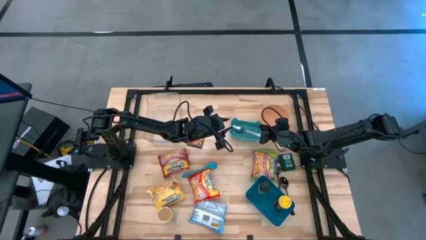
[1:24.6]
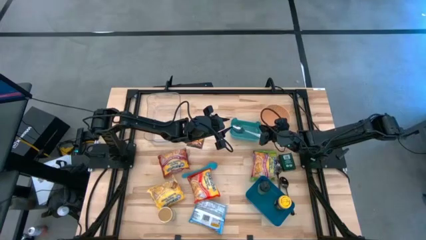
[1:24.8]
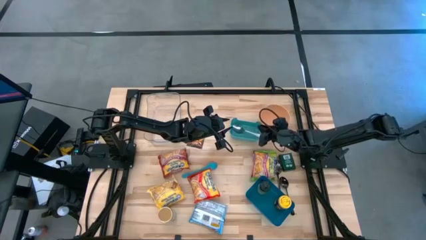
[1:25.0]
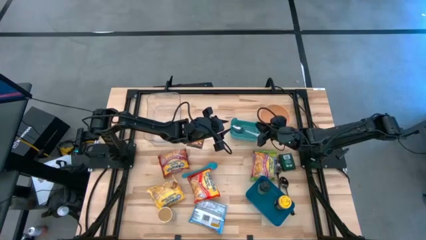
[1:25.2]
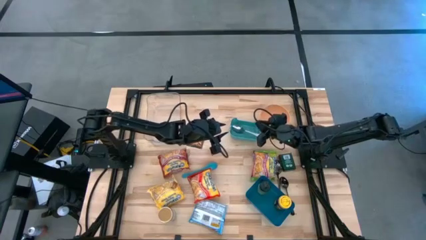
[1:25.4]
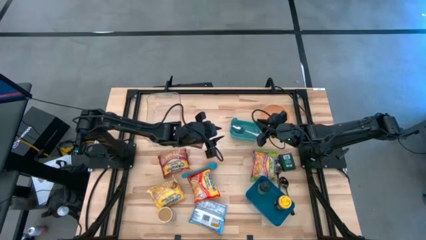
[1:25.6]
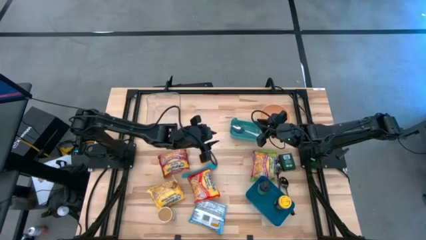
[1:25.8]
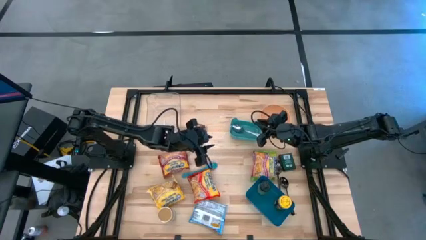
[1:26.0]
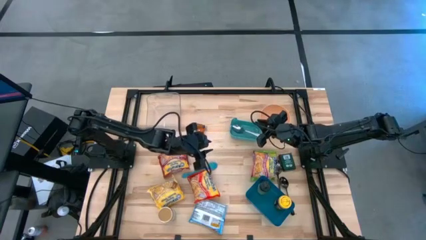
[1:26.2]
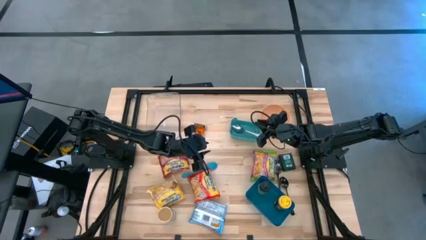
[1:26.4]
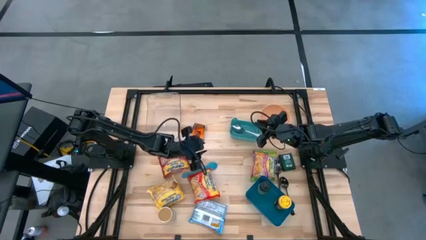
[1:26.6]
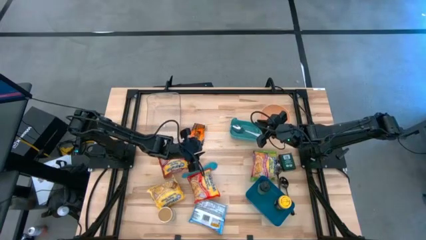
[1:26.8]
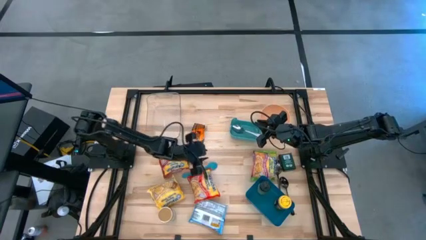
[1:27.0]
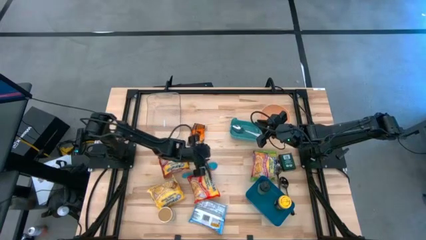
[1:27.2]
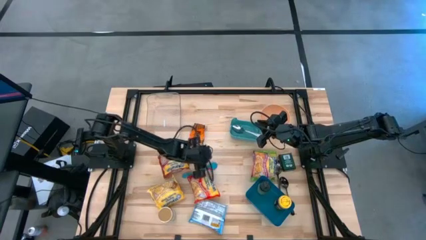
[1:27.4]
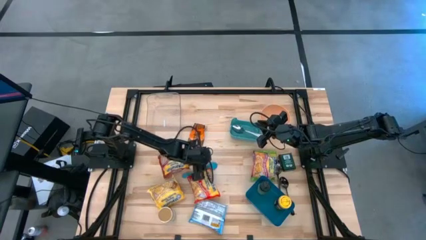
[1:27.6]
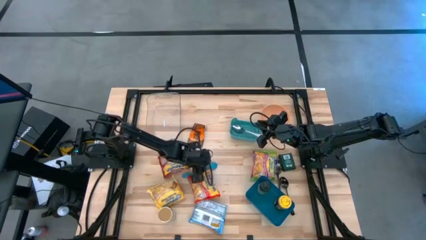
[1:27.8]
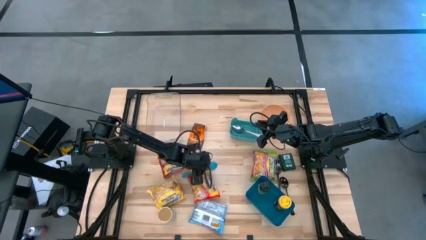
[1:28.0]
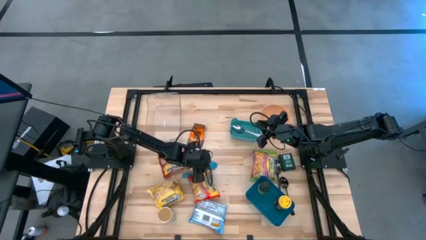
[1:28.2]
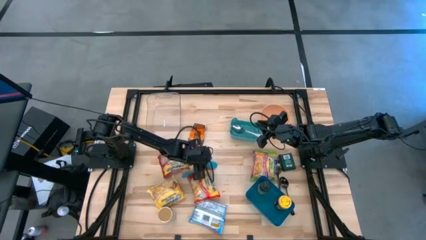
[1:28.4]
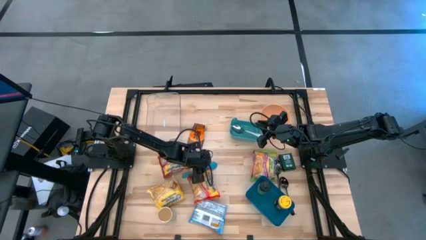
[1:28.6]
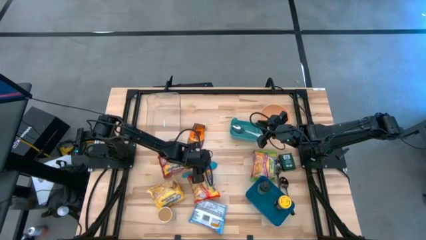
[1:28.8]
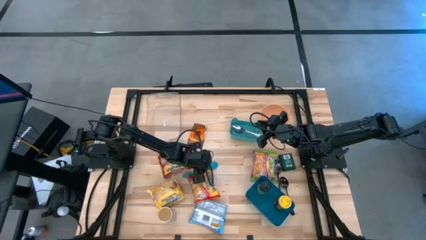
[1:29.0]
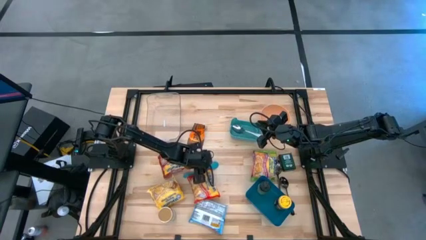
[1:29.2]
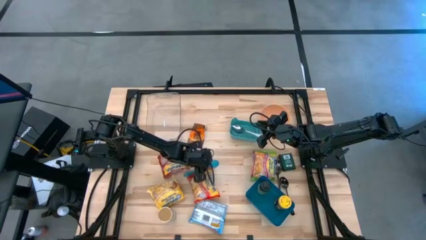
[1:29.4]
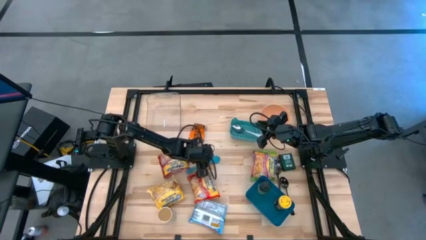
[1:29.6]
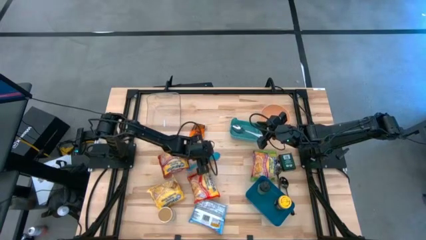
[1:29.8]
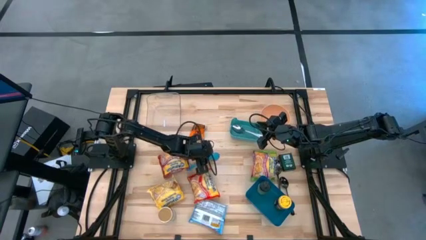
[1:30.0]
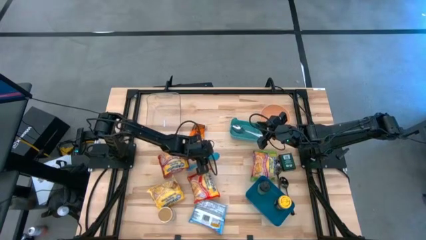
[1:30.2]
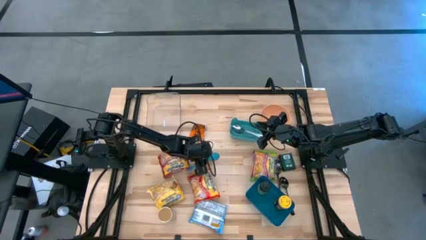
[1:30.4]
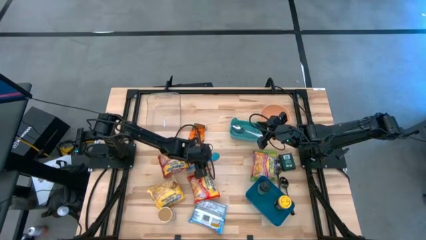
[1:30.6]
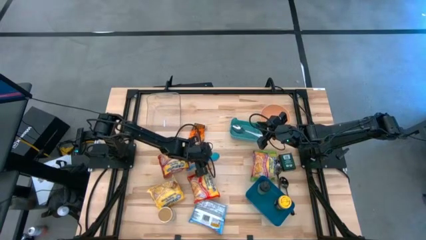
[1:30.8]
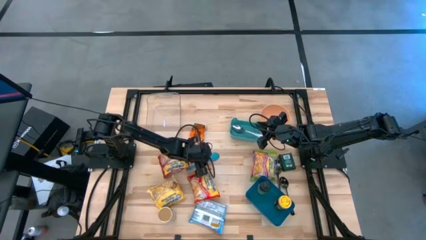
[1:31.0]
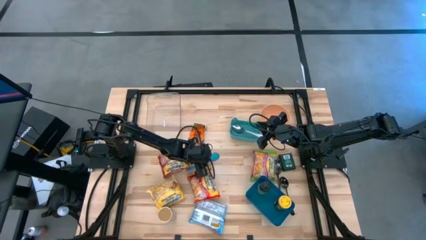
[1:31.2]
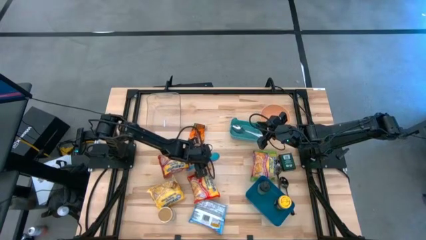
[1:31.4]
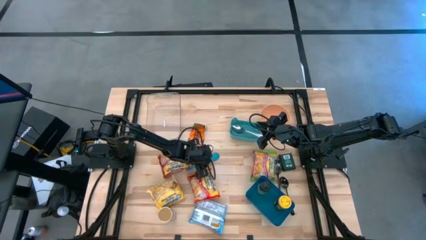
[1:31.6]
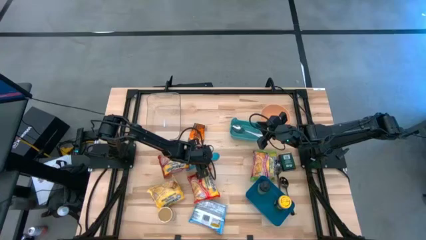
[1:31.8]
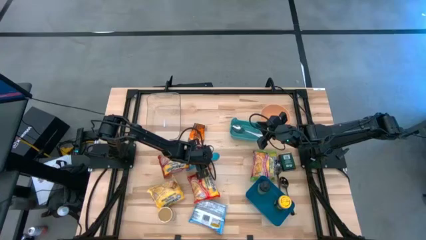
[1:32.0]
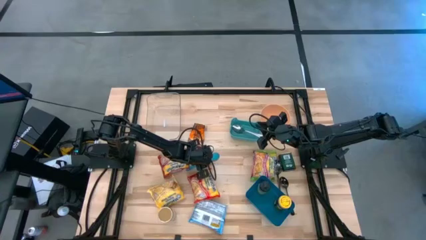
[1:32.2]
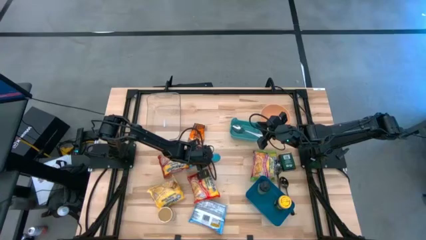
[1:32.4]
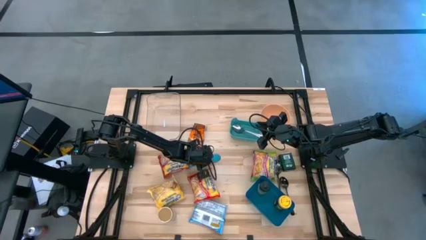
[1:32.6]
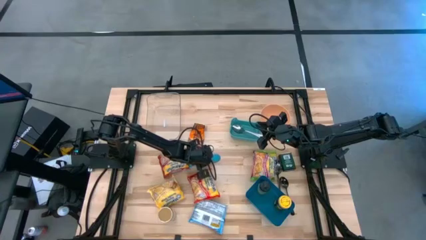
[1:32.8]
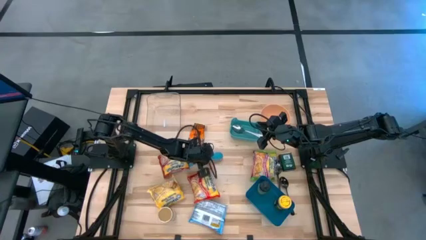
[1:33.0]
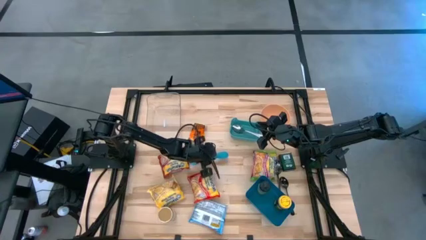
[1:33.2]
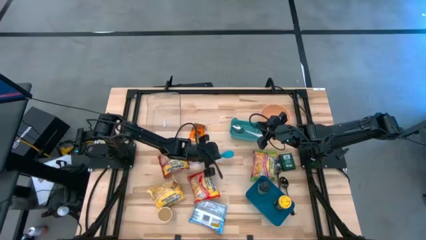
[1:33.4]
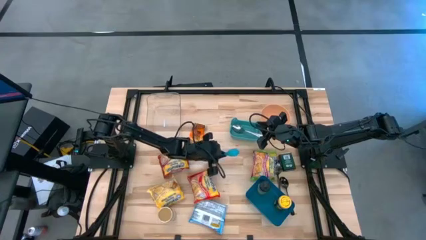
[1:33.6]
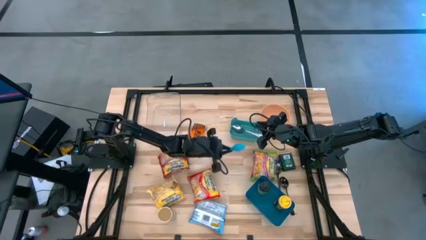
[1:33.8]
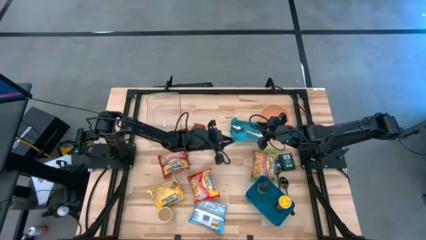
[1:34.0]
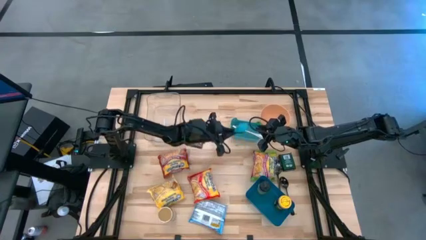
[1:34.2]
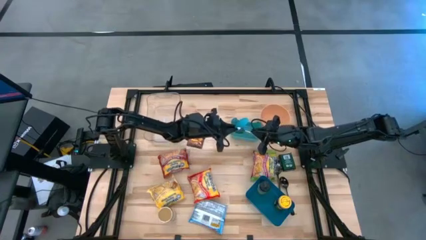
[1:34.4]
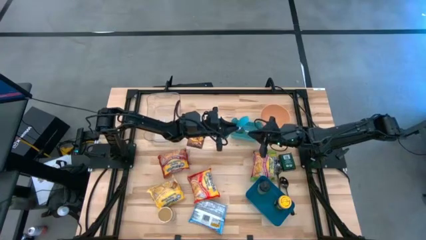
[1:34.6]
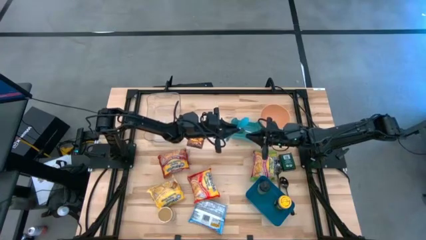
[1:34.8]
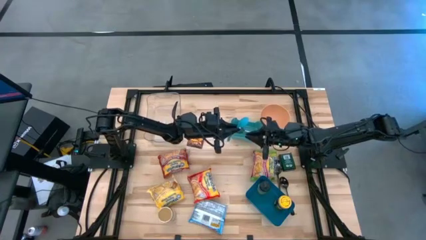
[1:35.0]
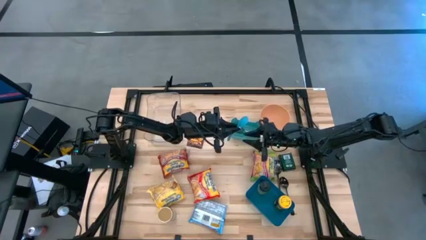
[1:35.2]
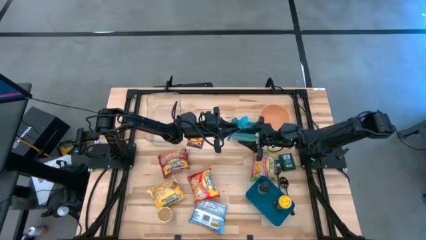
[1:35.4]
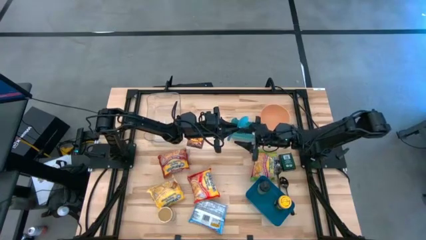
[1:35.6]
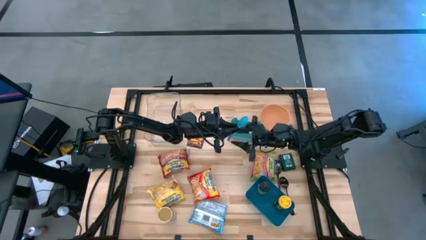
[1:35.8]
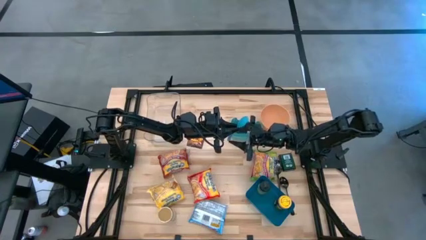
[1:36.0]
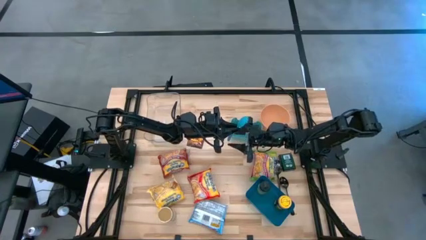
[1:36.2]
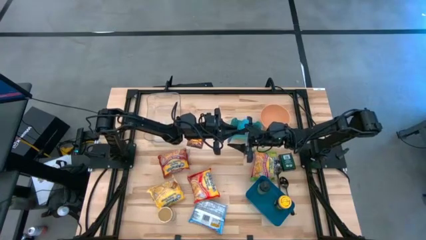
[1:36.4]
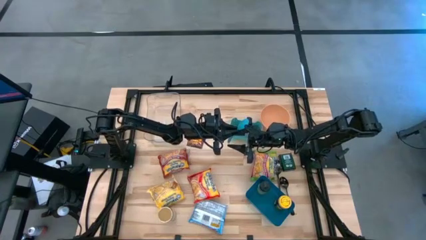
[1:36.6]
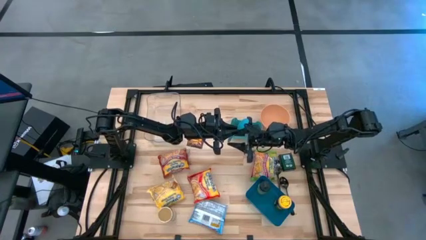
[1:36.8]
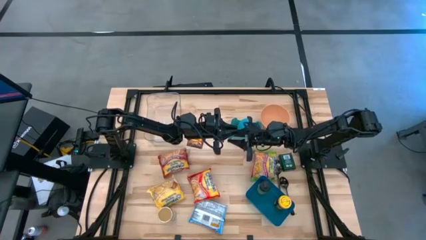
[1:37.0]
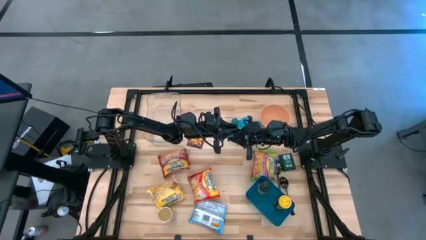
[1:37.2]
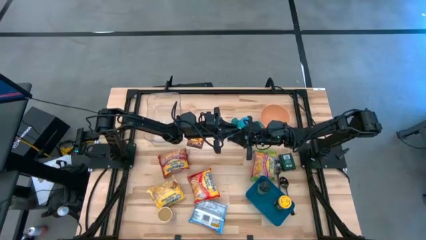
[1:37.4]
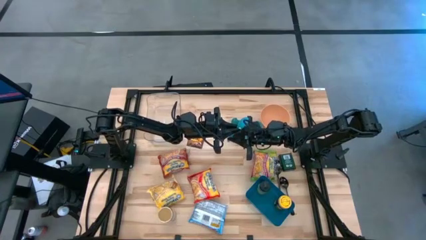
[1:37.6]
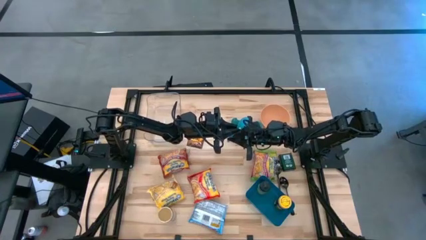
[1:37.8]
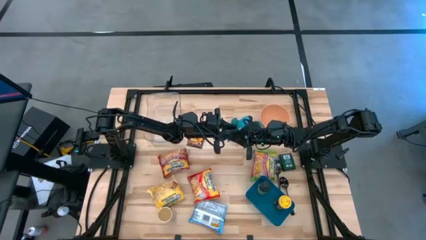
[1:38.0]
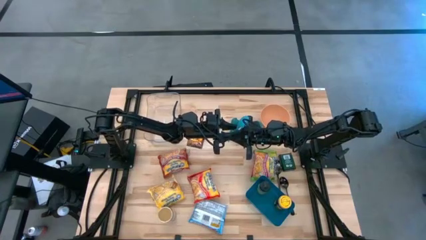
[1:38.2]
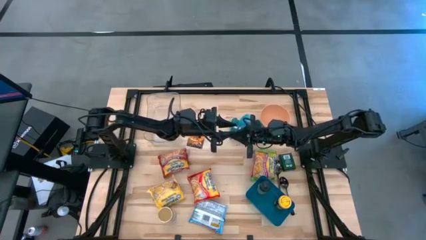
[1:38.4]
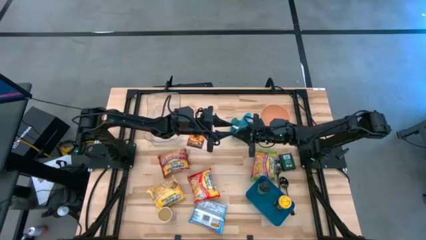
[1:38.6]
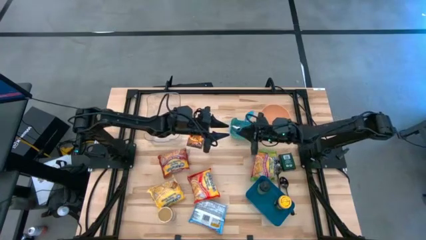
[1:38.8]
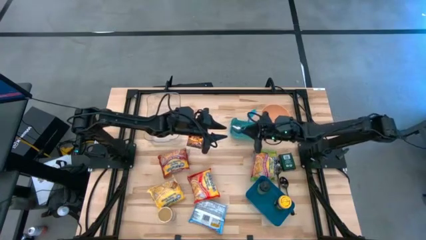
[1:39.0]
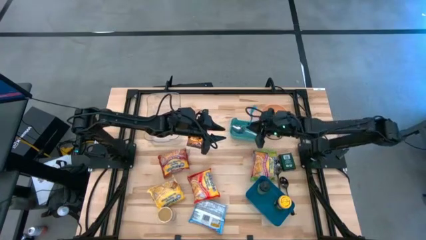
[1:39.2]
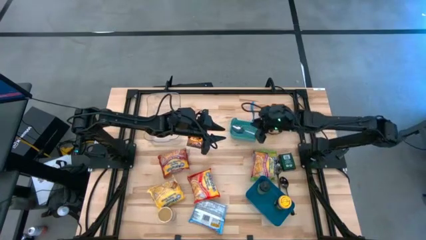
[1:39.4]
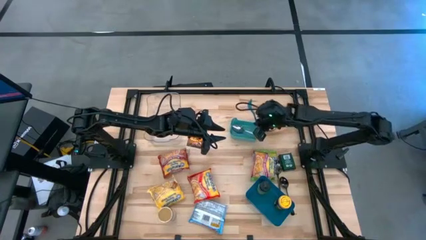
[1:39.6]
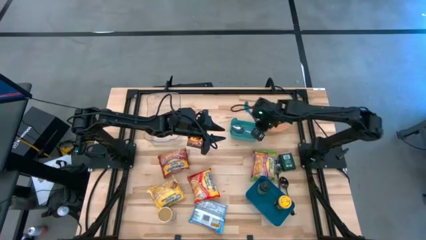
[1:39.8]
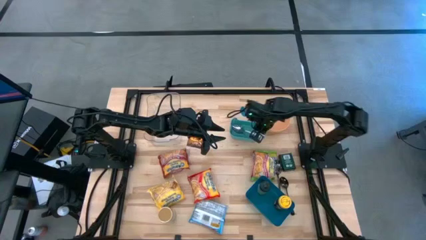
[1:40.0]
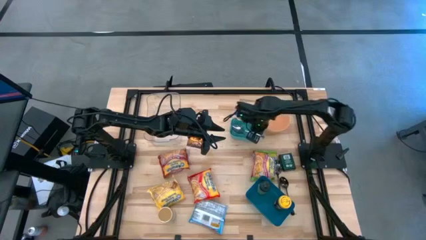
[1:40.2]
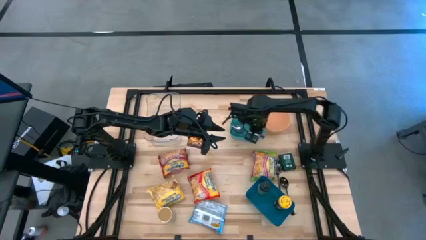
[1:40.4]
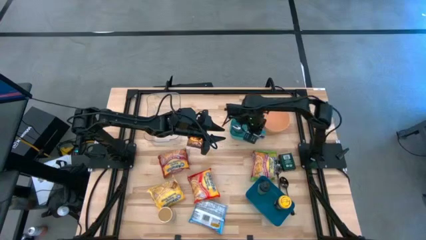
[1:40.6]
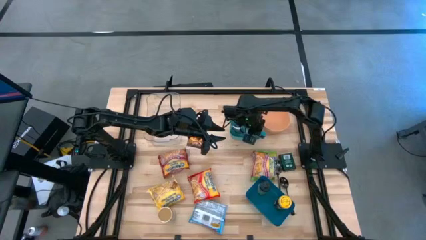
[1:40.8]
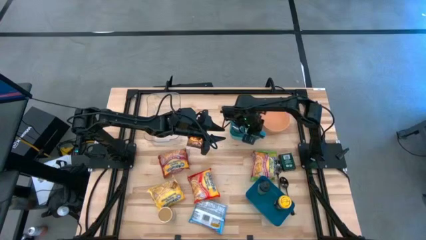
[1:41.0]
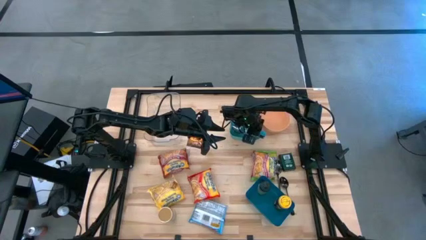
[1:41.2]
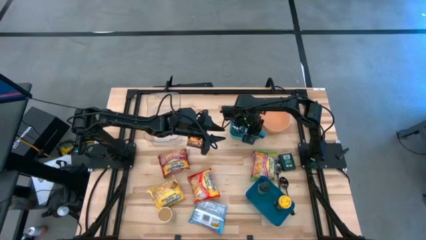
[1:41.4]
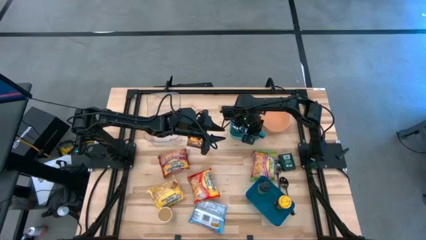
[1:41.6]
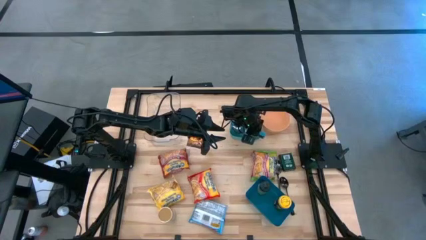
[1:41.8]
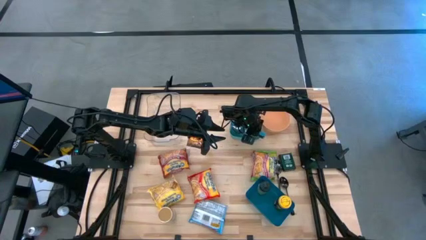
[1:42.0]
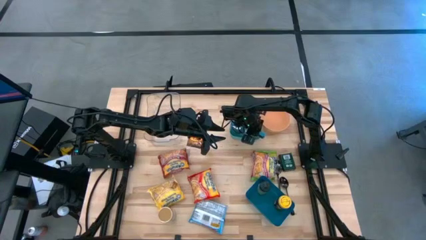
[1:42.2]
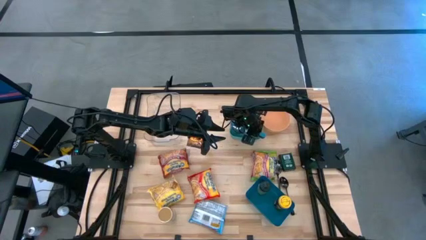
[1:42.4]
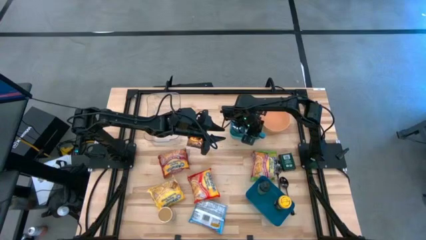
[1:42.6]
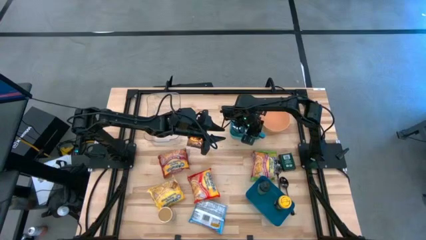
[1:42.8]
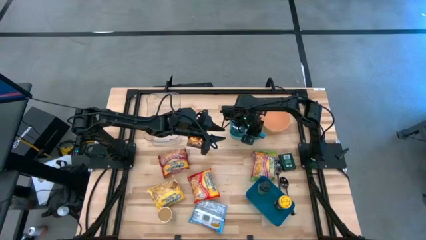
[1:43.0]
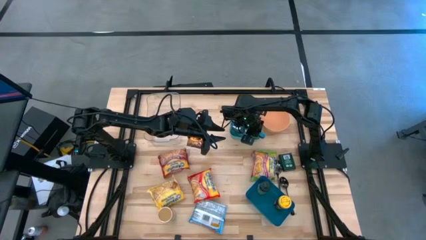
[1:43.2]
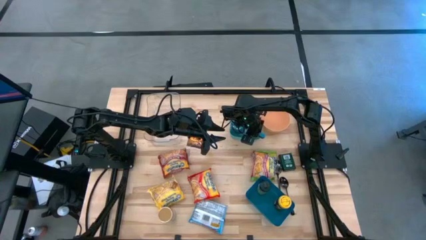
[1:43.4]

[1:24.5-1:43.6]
Task: Pick & Place Food Item
Put the blue spoon into the green bin
